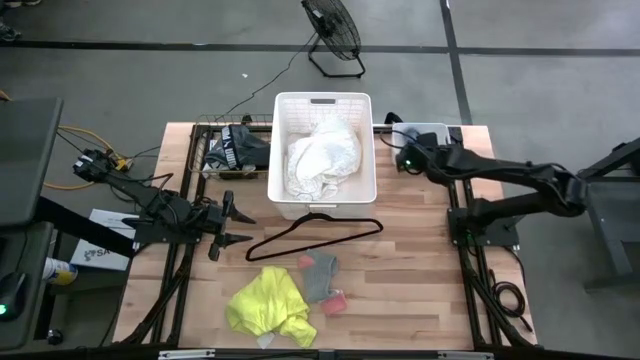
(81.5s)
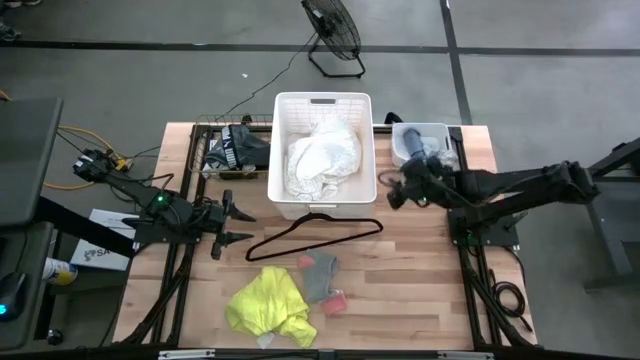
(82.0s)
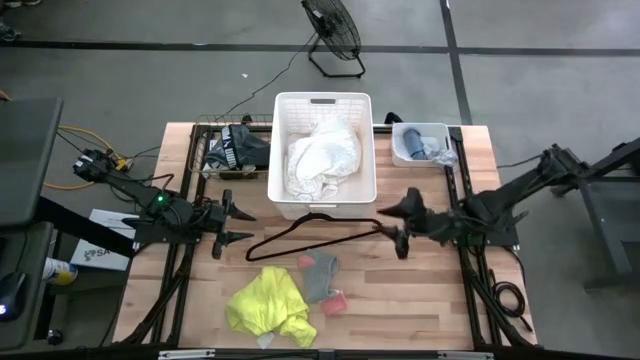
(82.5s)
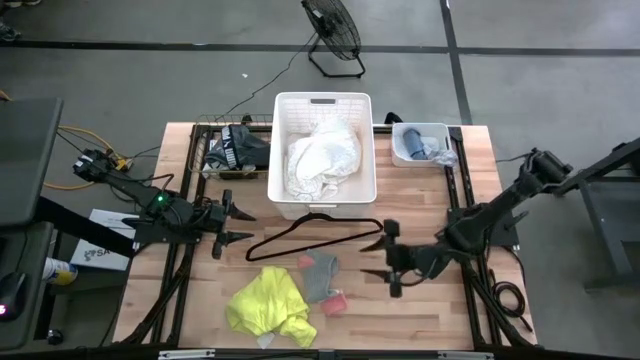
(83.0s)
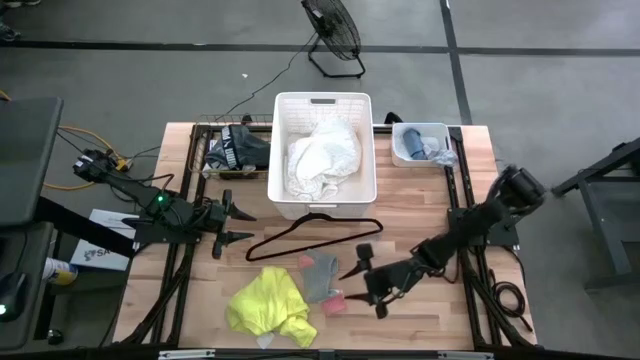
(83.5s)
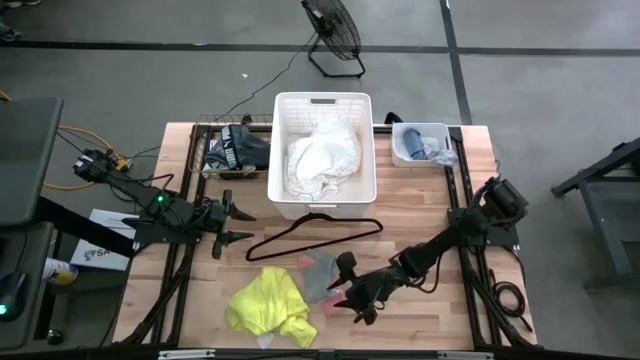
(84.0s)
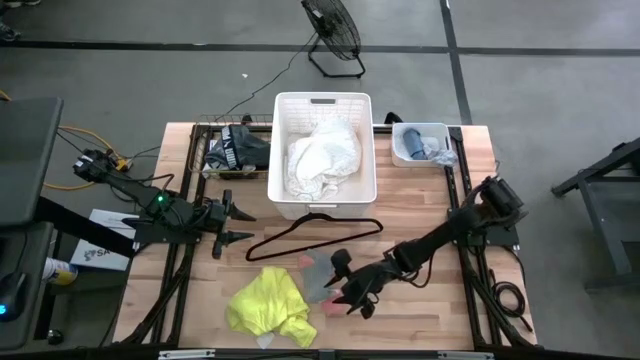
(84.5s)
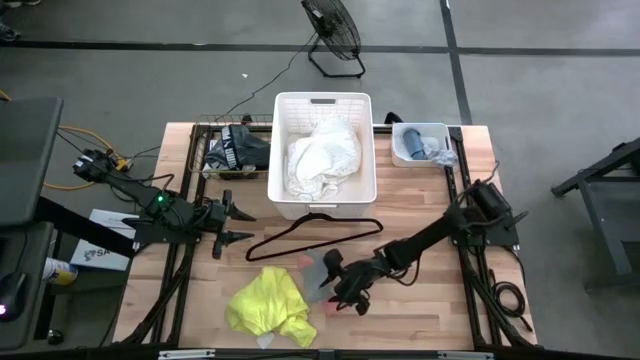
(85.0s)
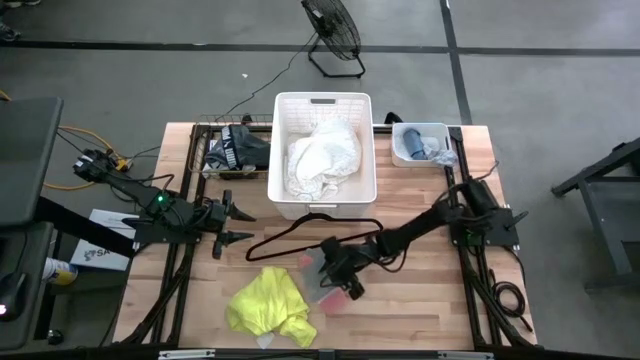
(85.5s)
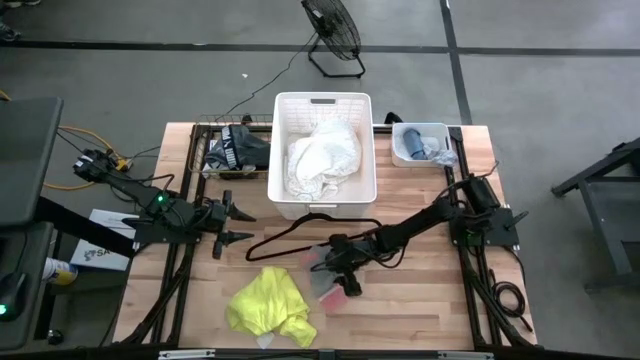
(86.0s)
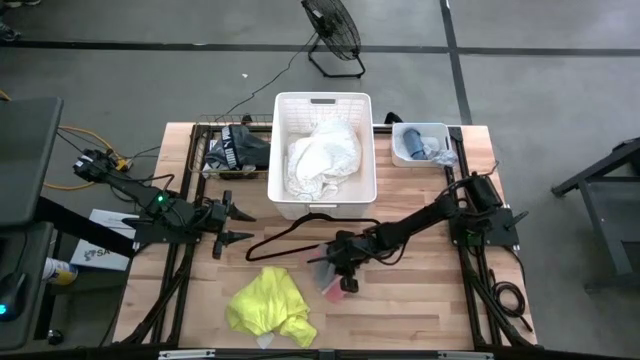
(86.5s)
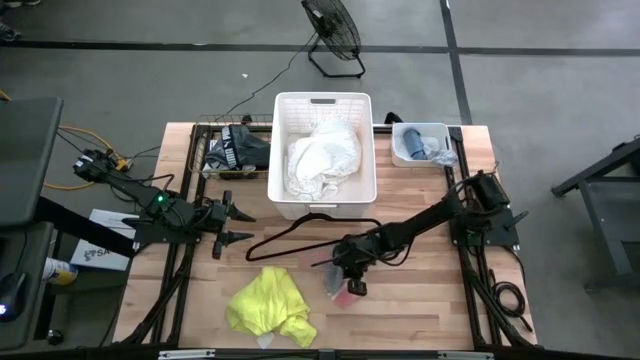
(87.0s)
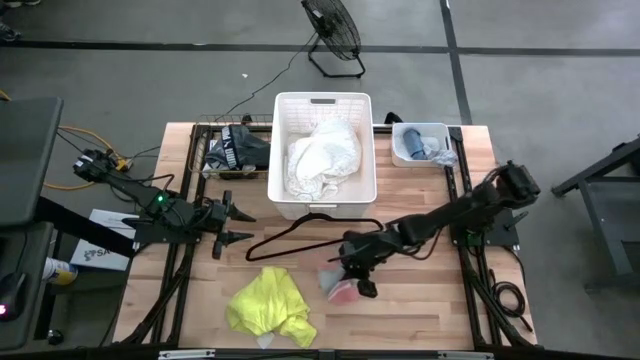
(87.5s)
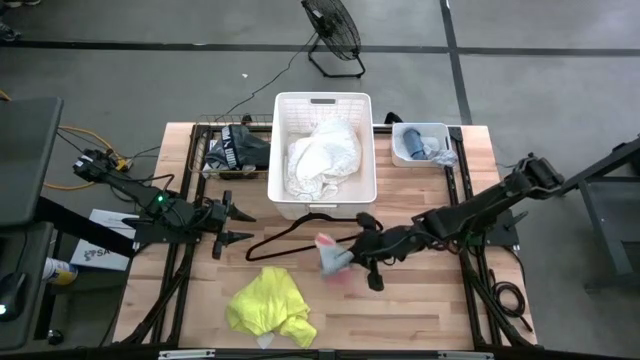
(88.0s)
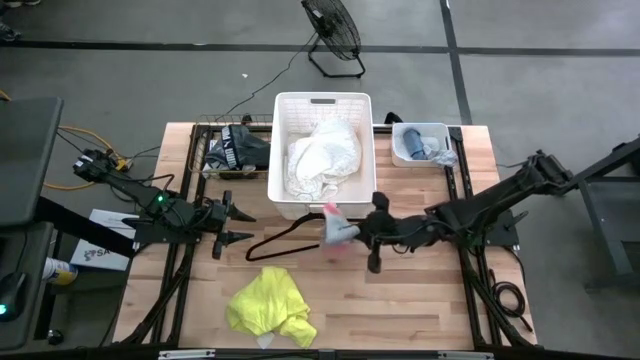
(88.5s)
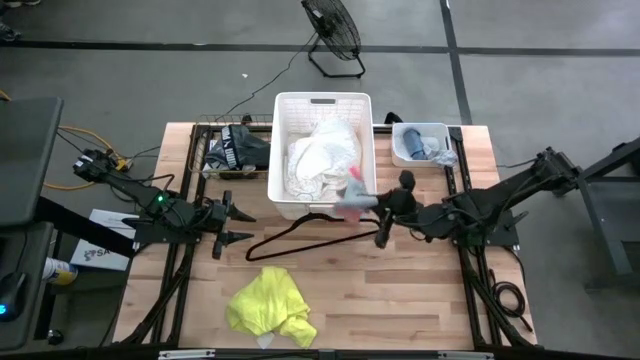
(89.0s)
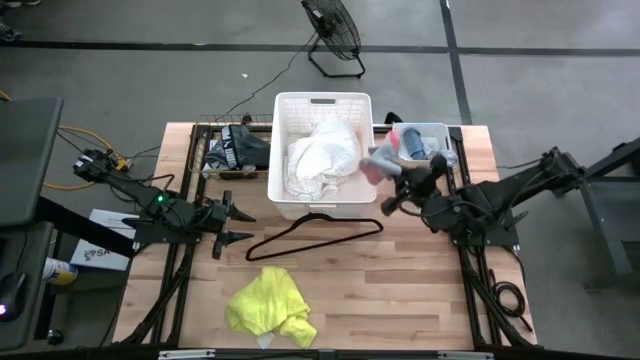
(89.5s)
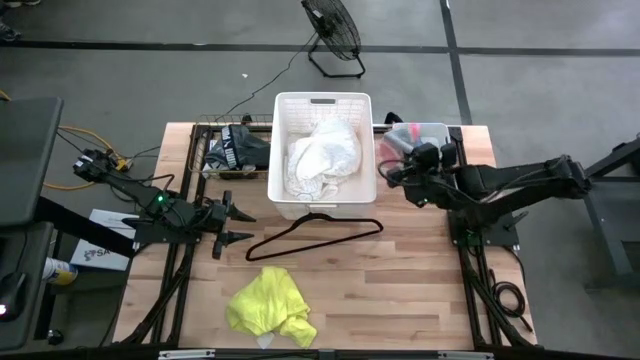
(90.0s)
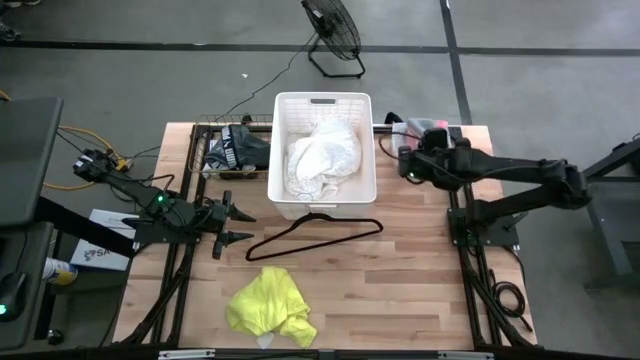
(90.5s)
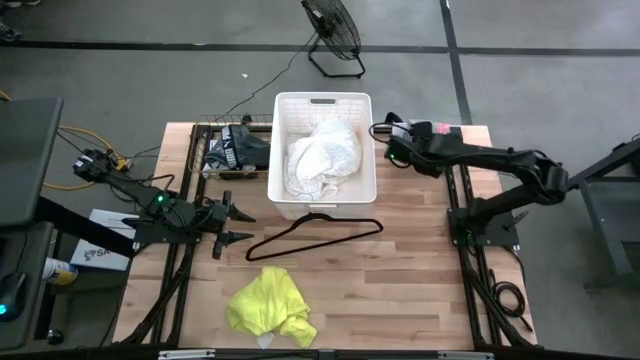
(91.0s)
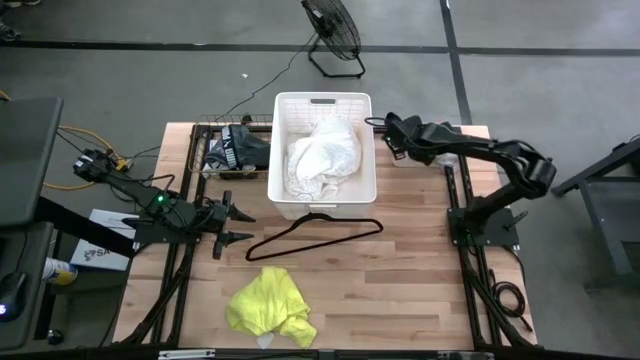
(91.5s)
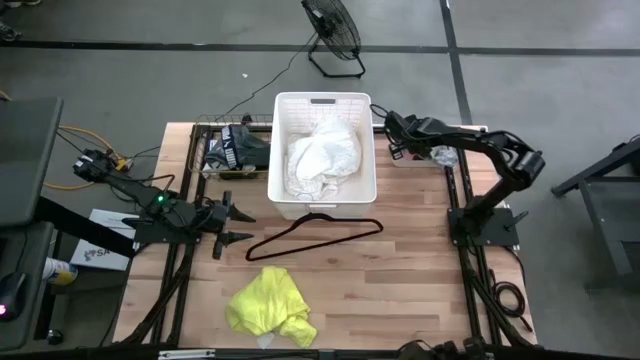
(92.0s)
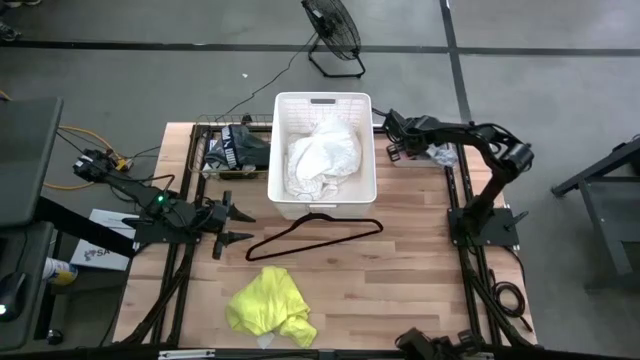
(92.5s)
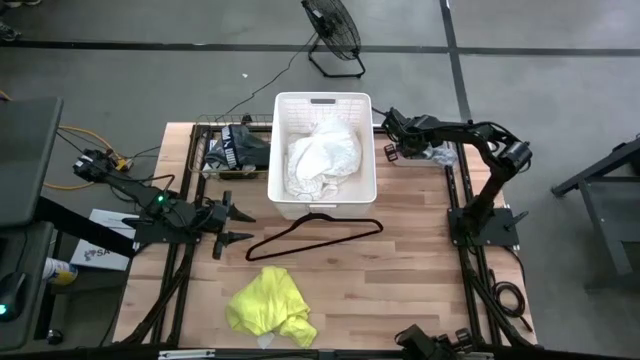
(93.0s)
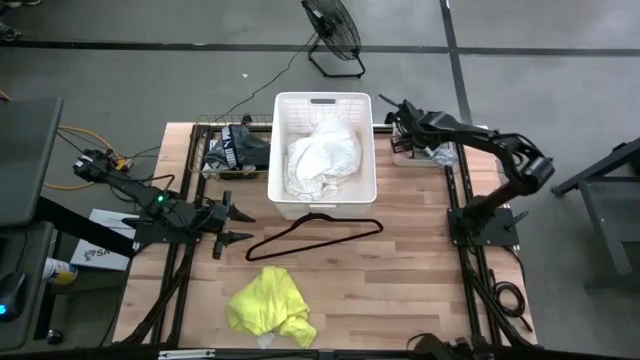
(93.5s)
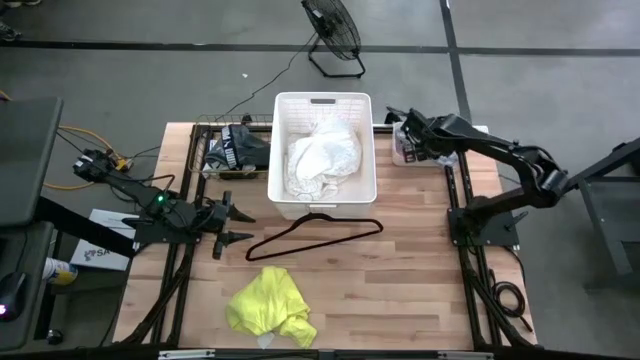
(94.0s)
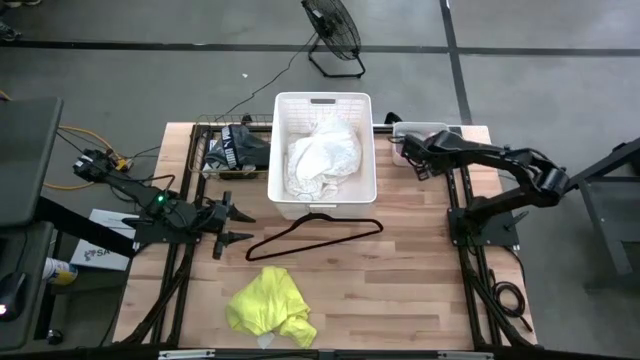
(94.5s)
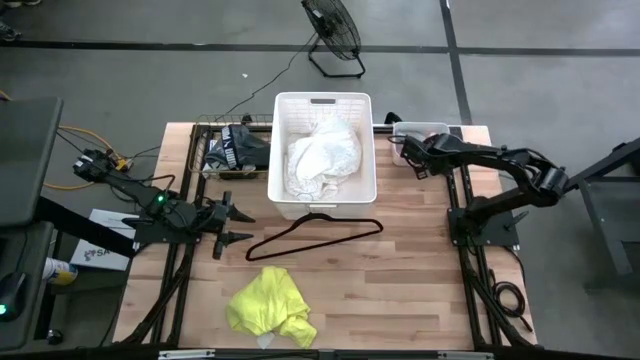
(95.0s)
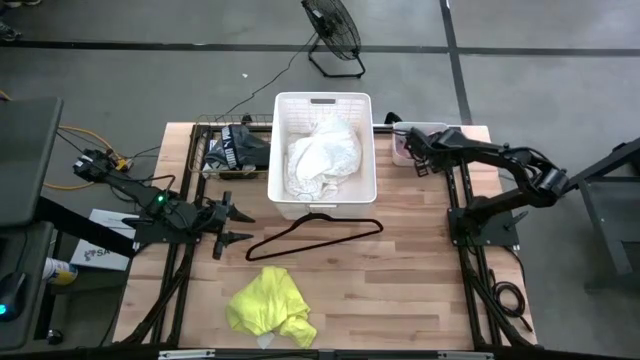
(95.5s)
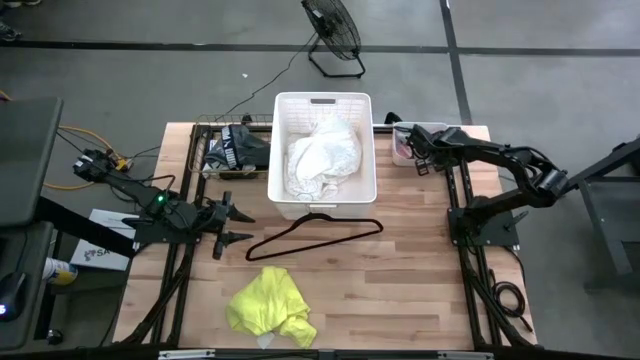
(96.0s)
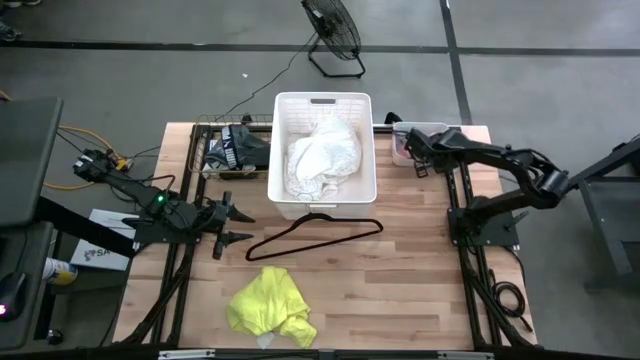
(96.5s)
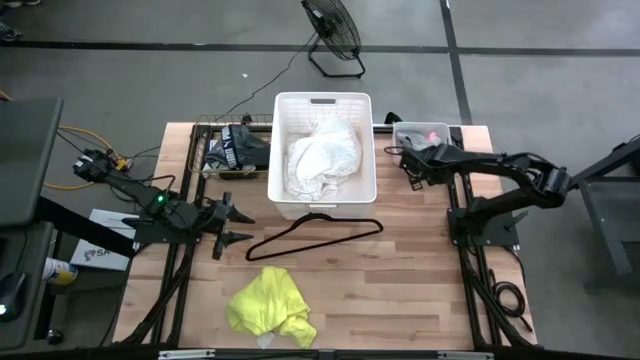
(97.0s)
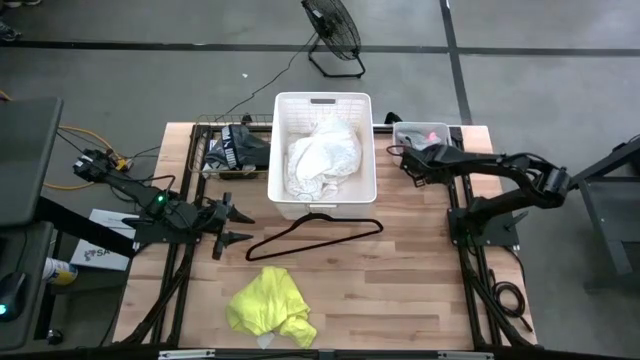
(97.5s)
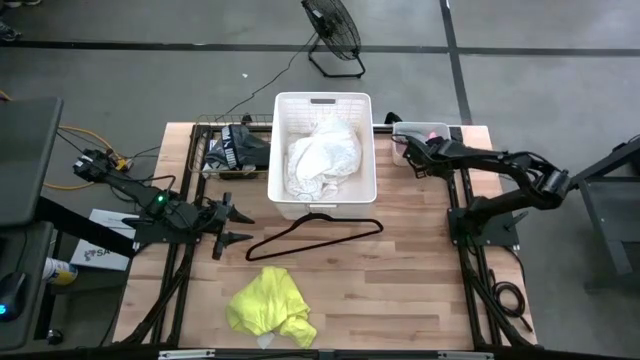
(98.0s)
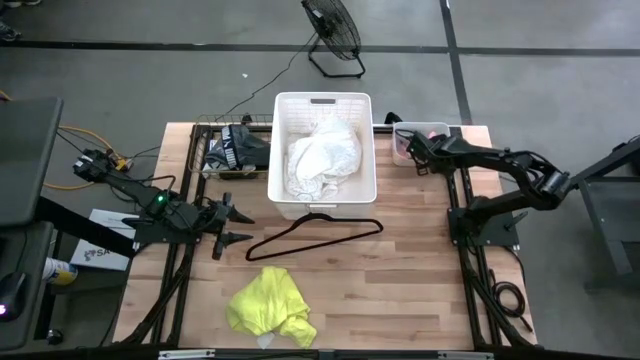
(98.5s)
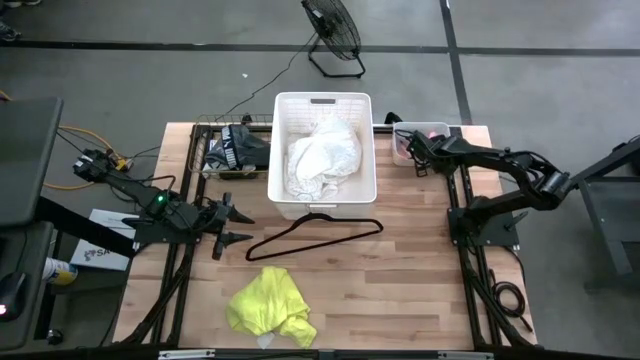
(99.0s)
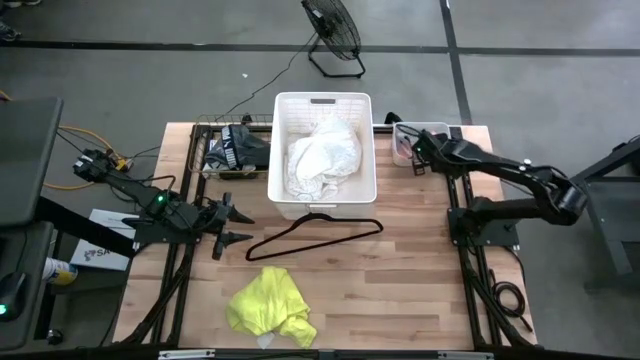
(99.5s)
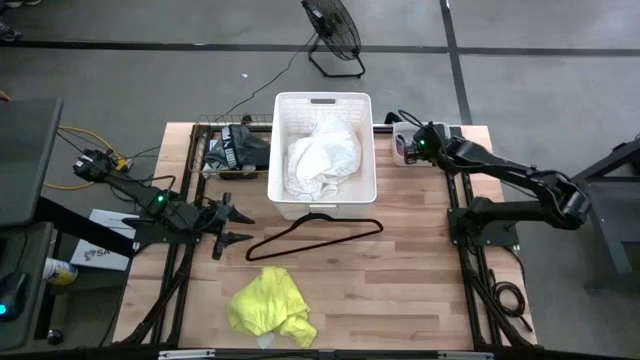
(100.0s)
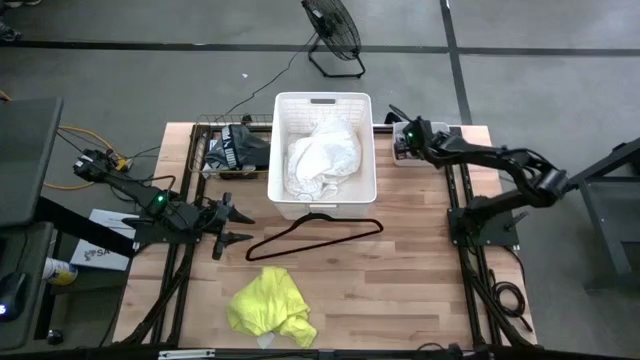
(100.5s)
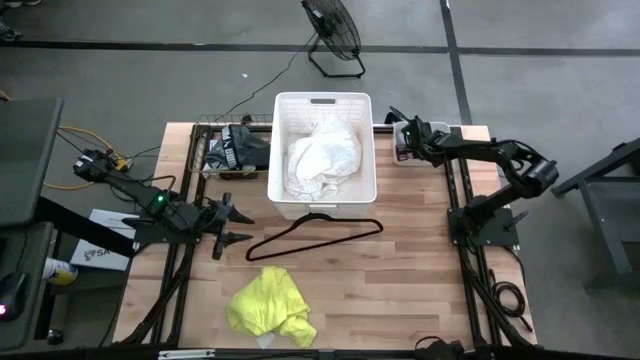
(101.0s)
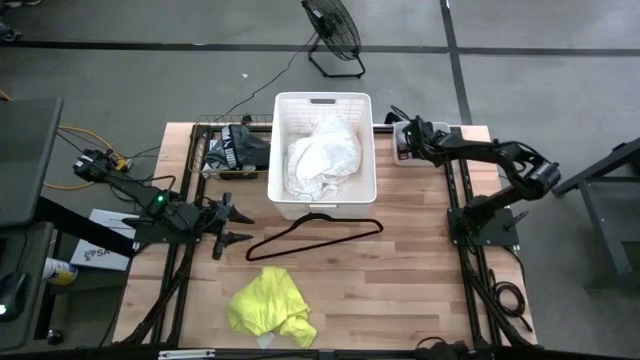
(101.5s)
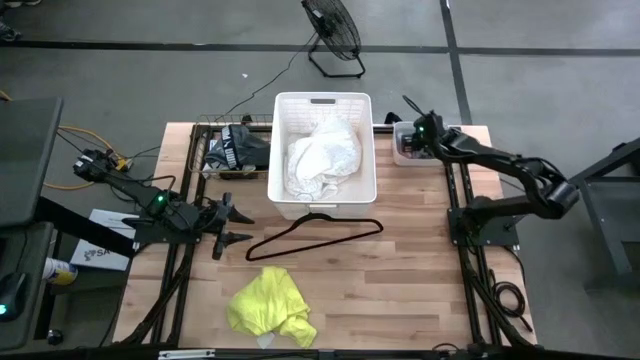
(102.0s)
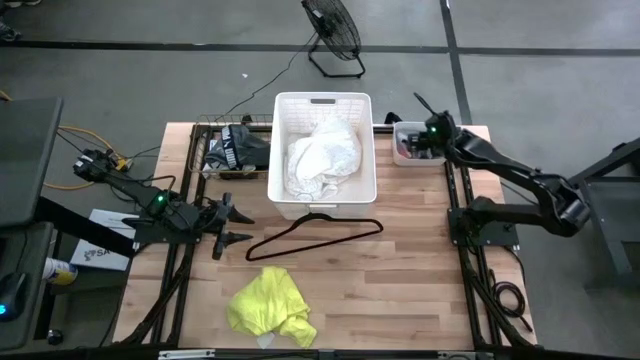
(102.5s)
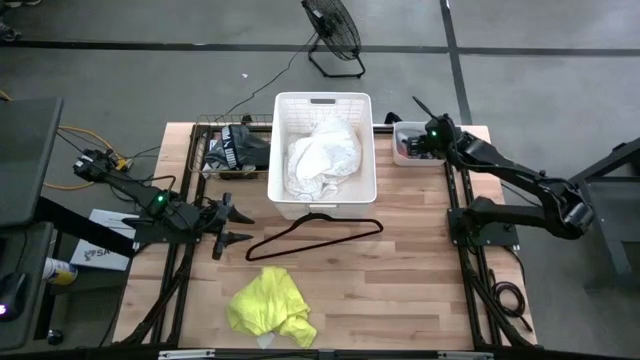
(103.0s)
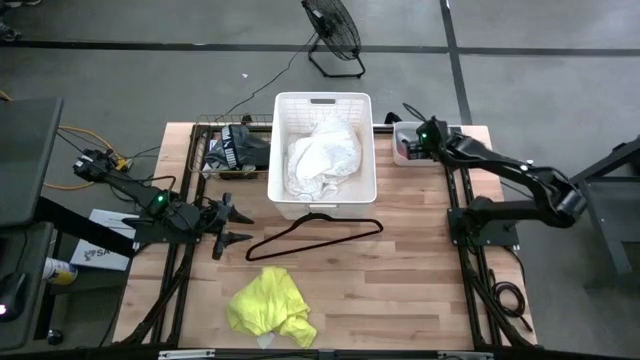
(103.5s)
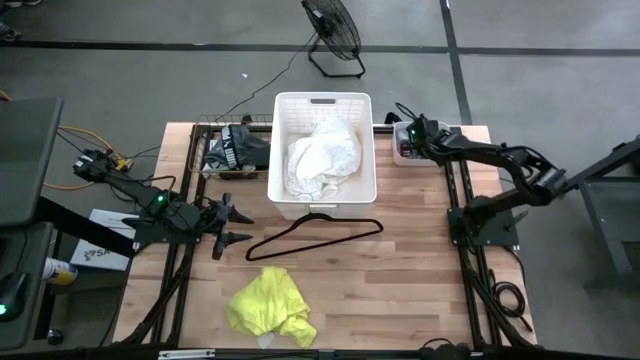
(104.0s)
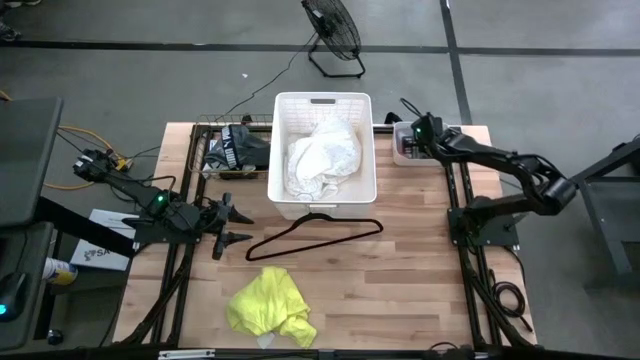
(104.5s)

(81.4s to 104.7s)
Task: Pick & Place Cloths
Put the gray pink sock into the small white bin
